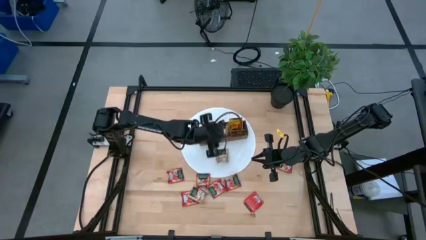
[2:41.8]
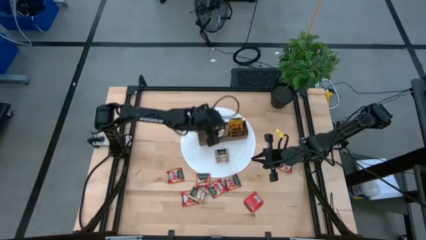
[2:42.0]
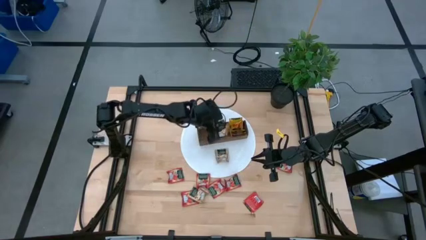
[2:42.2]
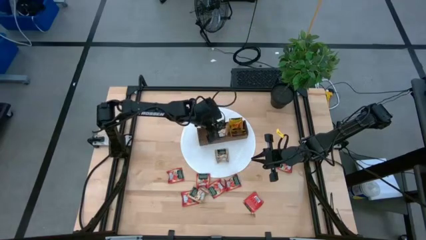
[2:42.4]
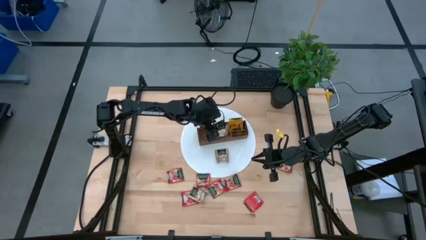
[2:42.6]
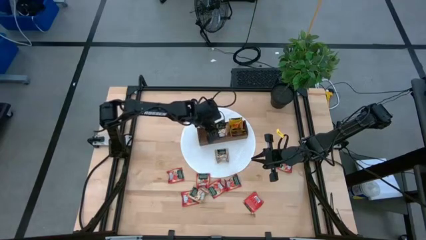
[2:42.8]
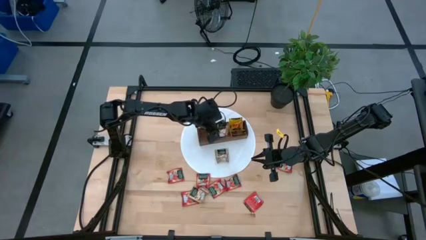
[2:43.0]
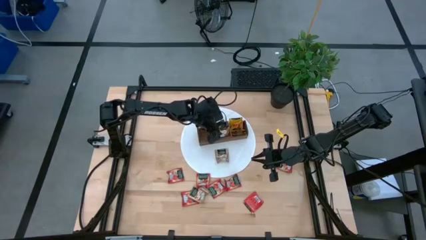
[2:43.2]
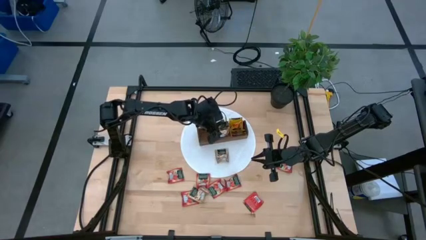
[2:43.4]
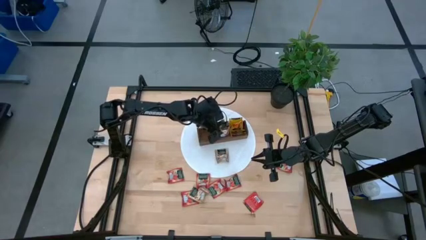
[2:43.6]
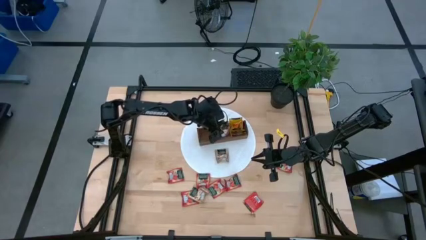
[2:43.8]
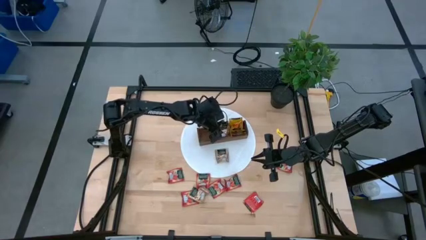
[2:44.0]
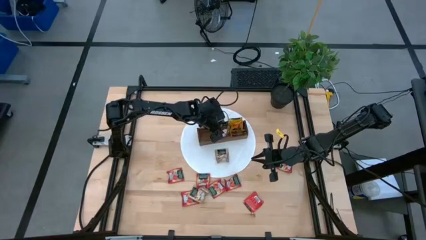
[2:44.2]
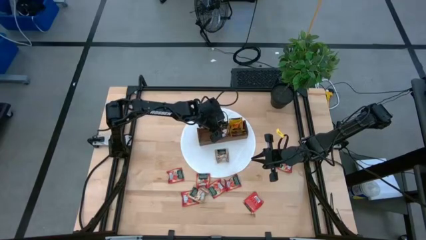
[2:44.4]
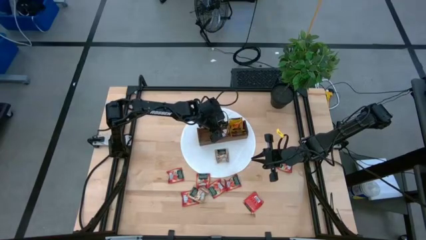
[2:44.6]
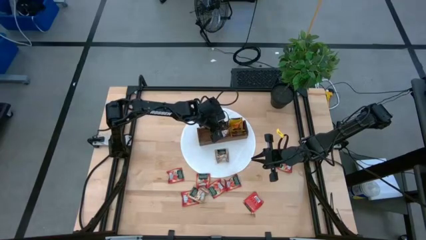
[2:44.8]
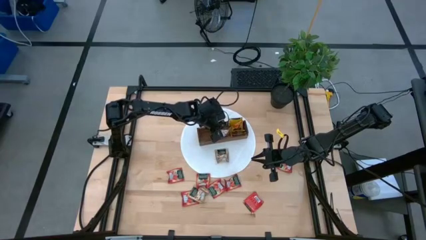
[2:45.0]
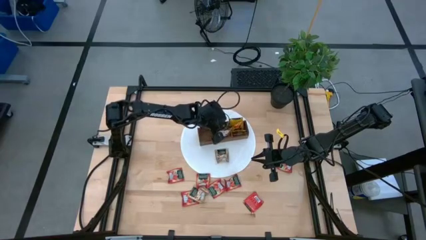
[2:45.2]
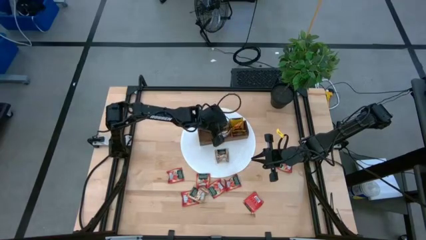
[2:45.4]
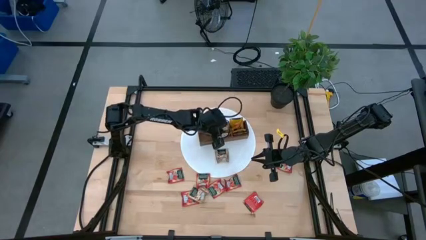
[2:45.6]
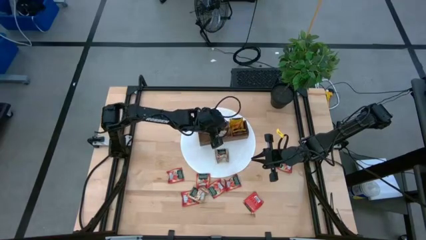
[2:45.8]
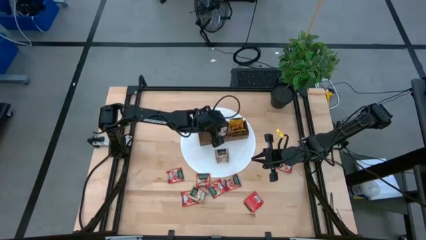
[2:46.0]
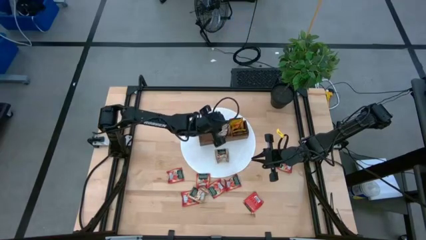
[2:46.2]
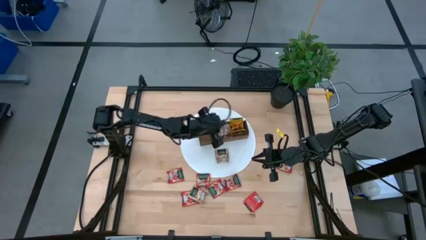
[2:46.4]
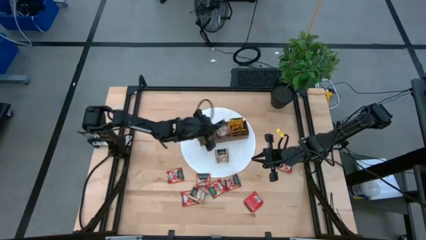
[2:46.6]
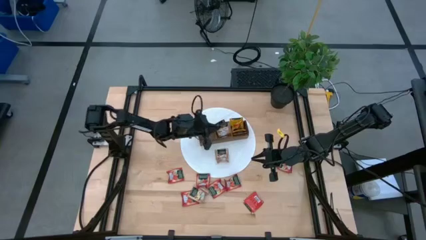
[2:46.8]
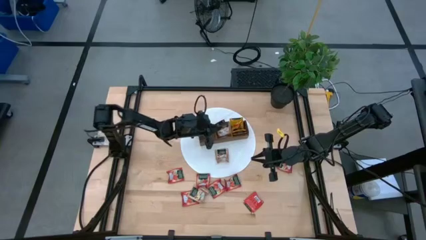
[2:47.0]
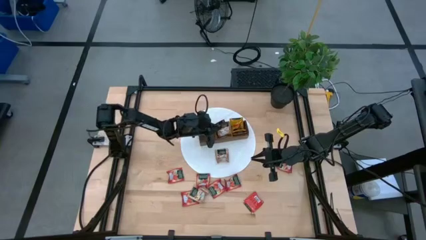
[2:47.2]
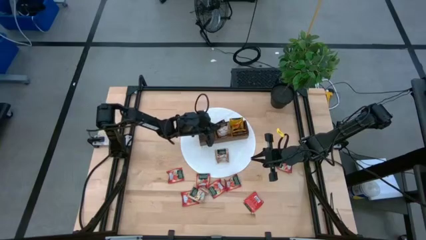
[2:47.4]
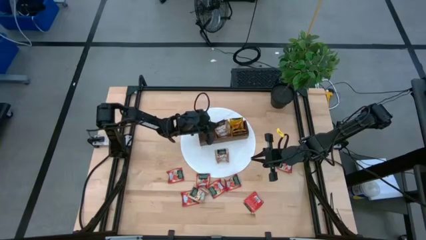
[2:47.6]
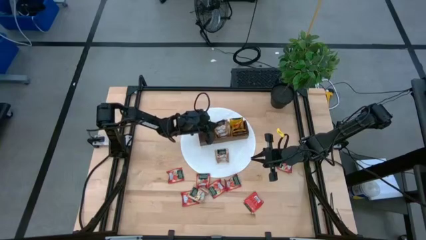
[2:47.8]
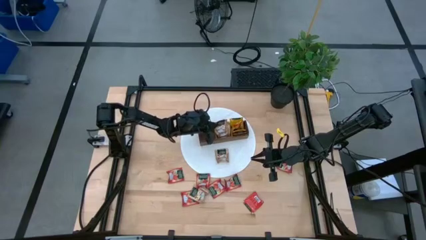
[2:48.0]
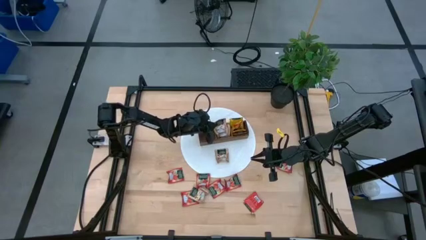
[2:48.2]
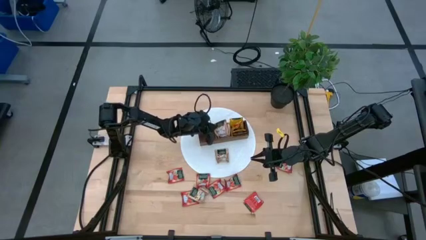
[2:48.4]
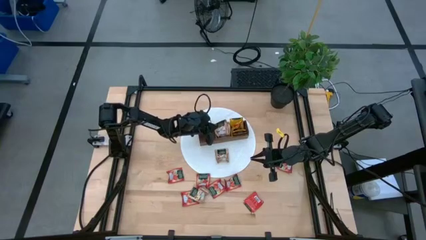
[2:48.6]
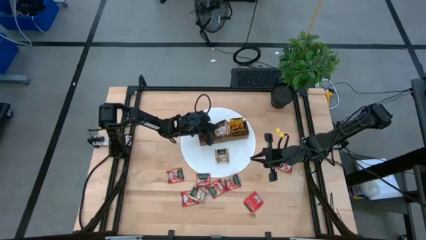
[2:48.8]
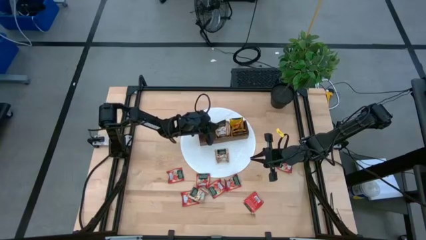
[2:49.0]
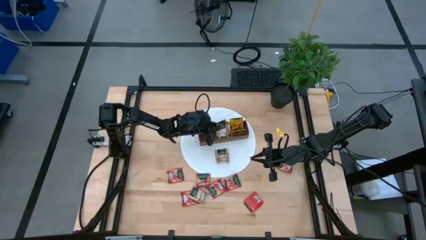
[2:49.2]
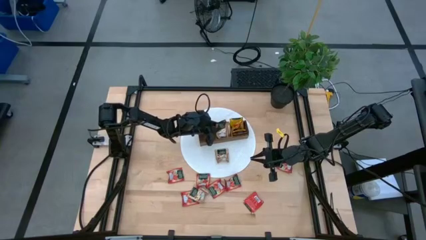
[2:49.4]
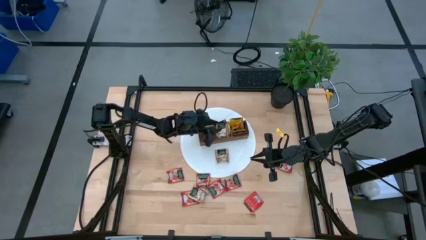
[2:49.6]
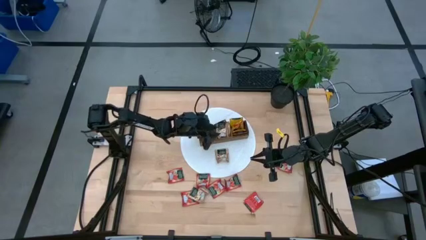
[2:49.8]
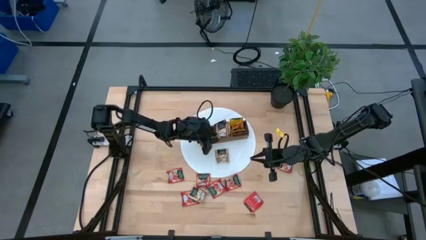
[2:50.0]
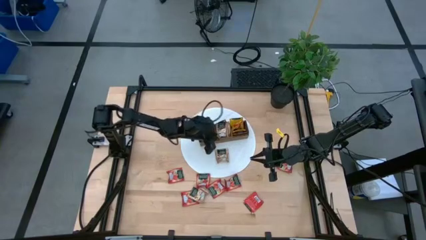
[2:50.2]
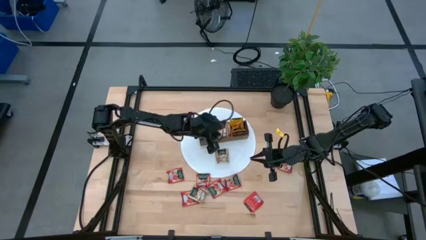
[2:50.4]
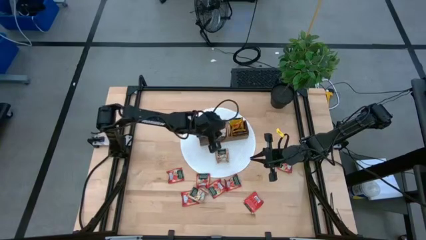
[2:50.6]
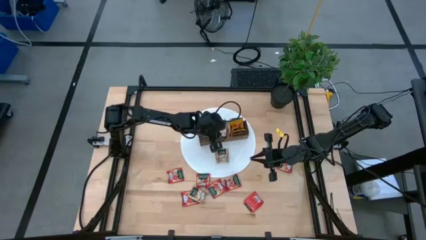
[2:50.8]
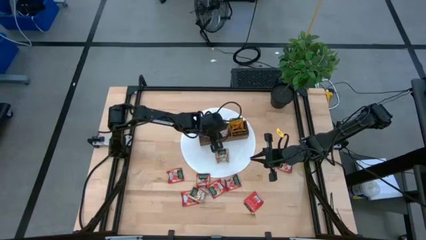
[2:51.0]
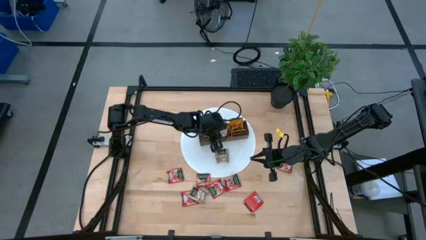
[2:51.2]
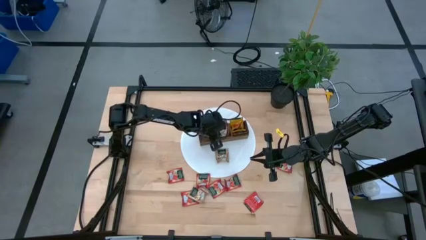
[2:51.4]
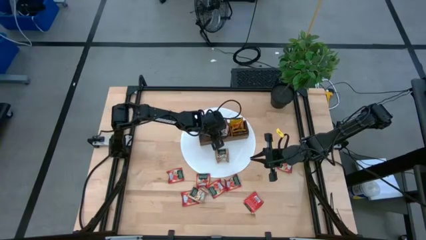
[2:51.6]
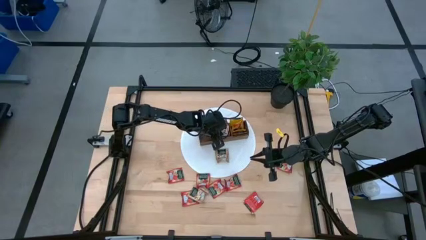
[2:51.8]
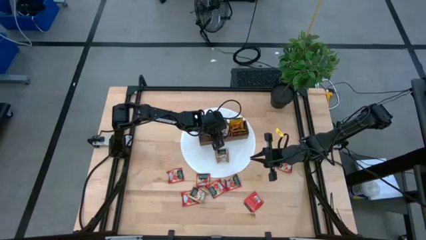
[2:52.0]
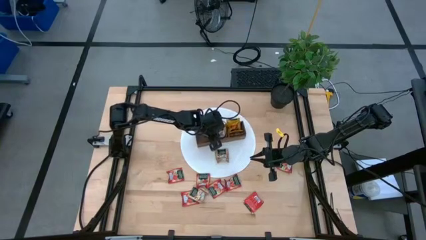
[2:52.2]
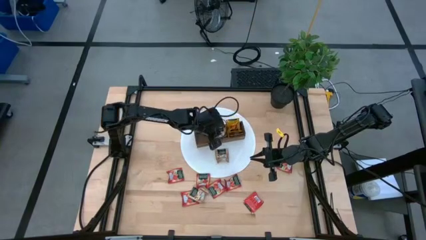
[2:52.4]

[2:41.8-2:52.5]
Task: Pick & Place Tea
Adjust the brown tea bags into the middle section of the wooden organizer

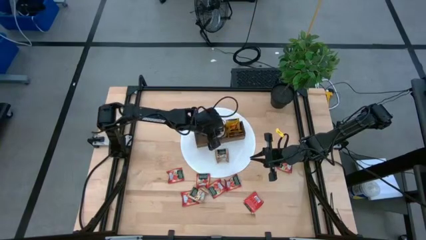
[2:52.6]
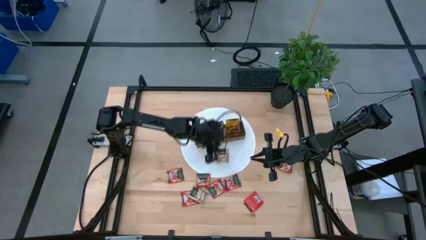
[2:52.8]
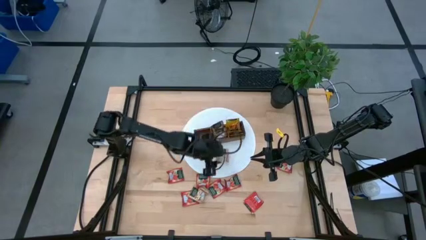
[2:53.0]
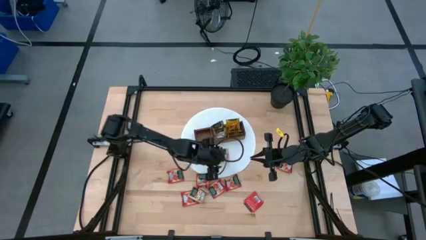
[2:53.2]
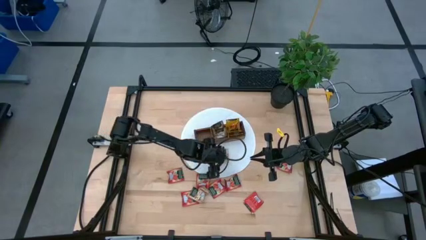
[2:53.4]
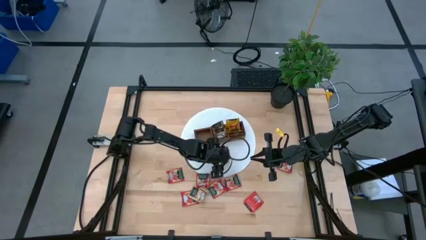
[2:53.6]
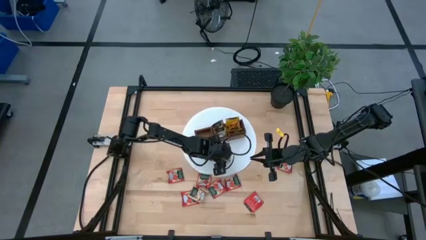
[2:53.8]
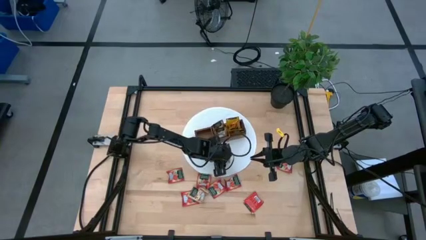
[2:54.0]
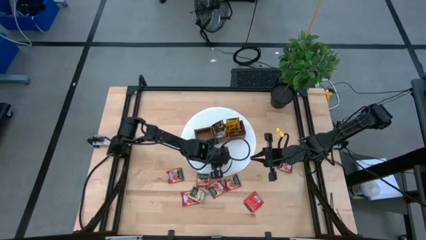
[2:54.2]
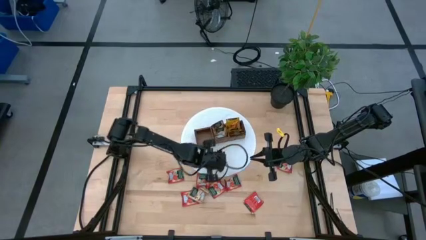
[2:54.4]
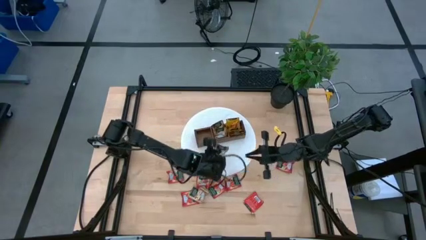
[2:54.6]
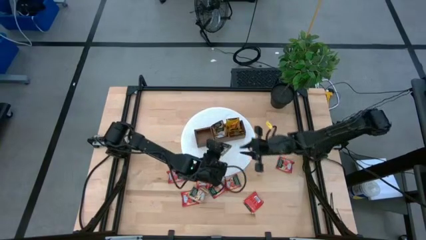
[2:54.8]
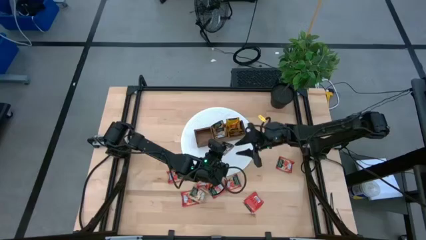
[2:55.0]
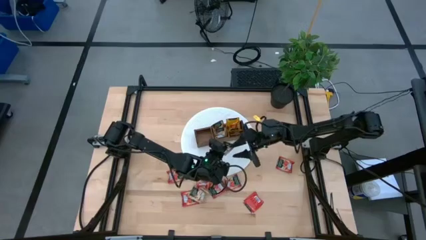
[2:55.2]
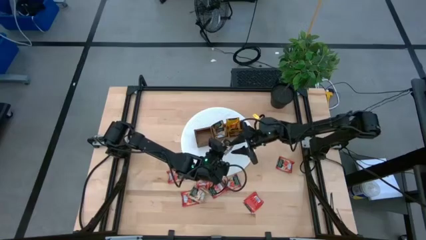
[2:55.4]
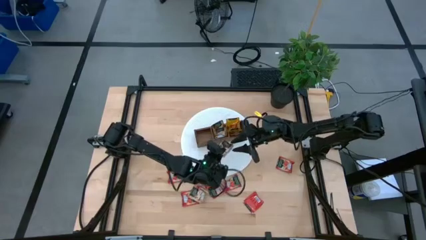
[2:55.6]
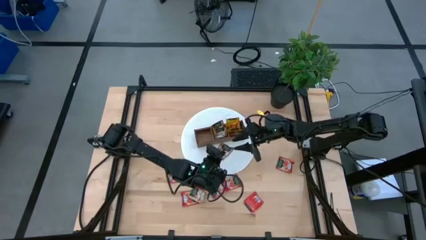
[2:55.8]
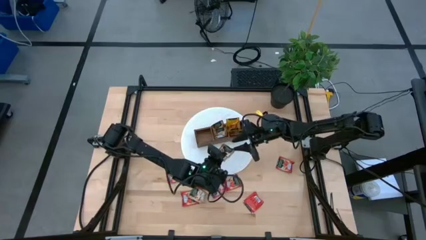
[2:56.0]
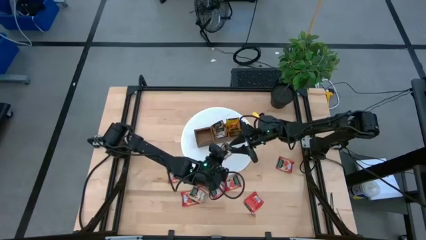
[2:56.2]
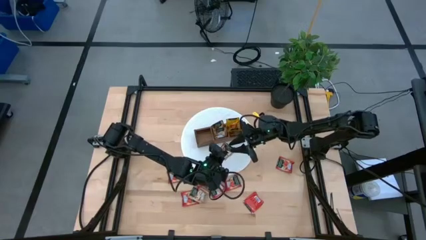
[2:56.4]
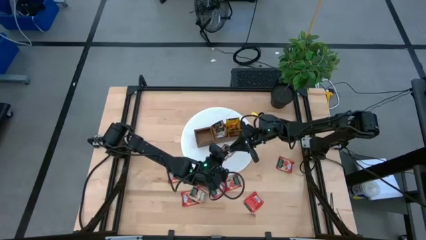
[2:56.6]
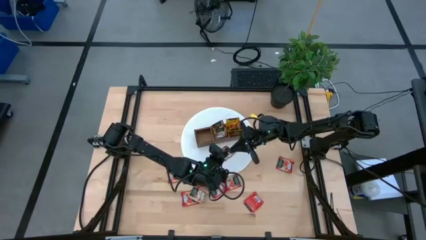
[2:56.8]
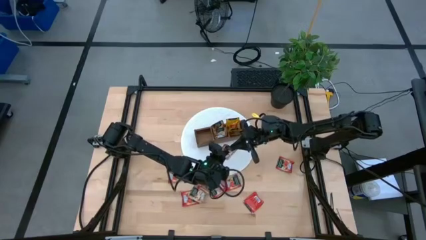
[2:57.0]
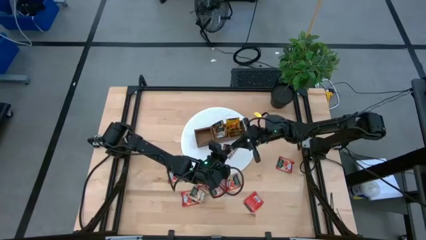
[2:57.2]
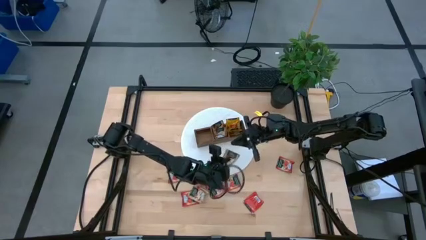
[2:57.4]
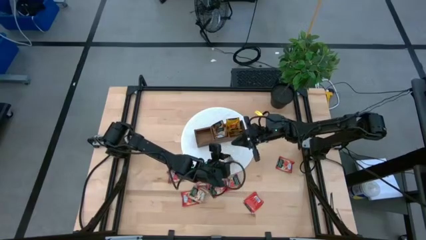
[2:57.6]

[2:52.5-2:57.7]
Put the brown tea bag into the middle section of the wooden organizer

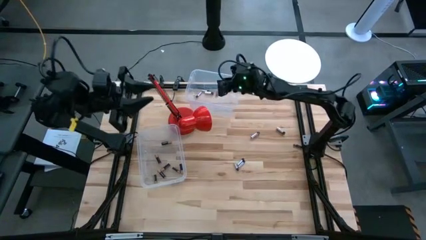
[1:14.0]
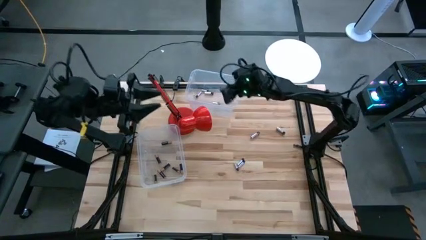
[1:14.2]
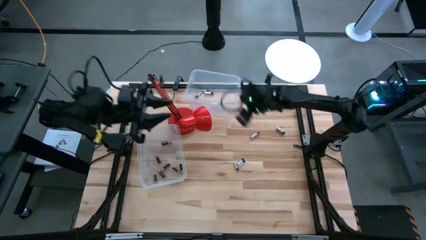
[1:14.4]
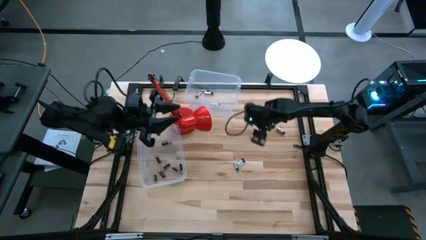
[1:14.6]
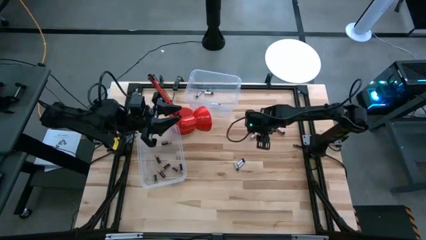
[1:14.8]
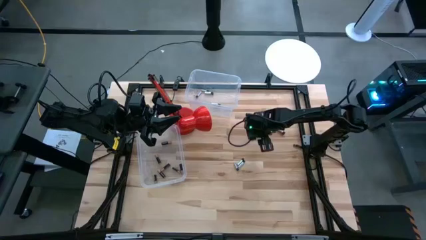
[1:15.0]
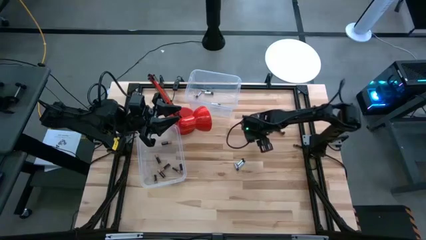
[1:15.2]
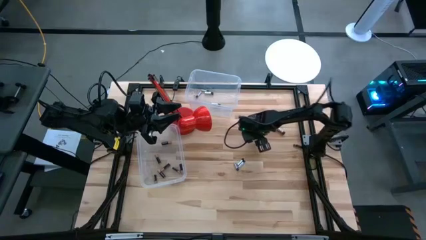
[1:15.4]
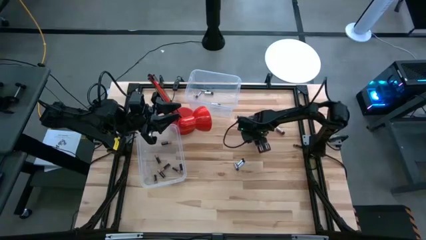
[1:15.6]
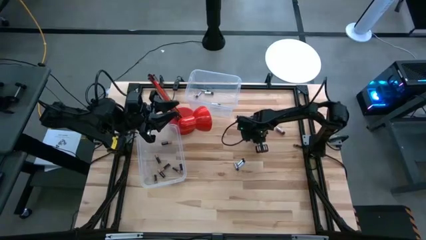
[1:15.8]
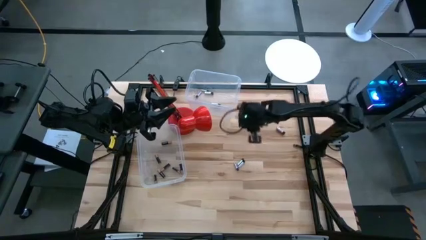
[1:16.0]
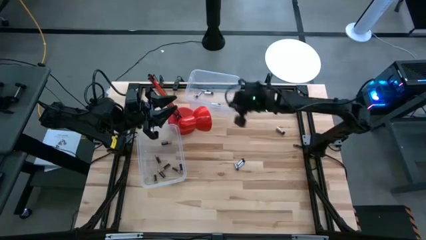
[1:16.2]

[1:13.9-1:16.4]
Task: Sort batteries
Put the white battery into the top transparent bin
